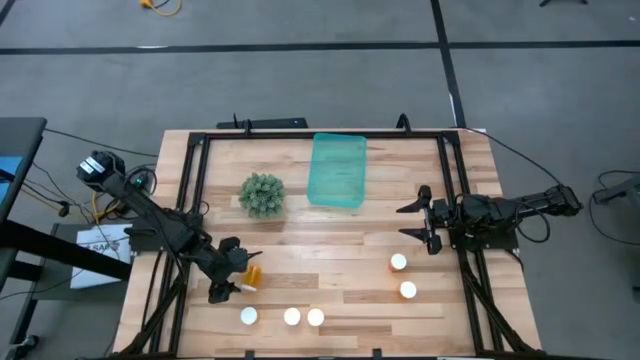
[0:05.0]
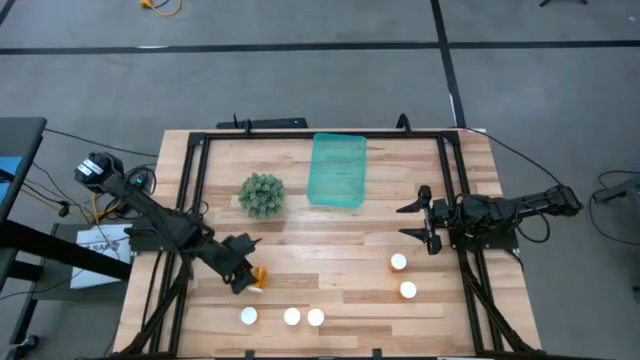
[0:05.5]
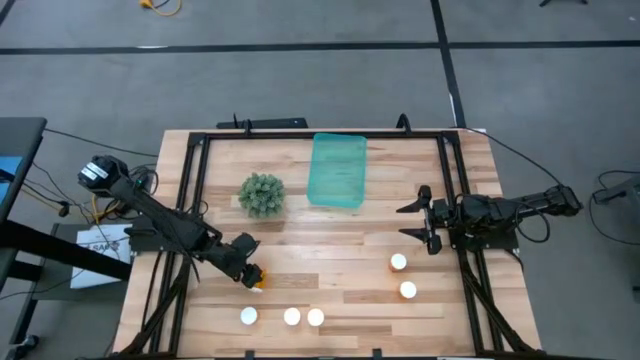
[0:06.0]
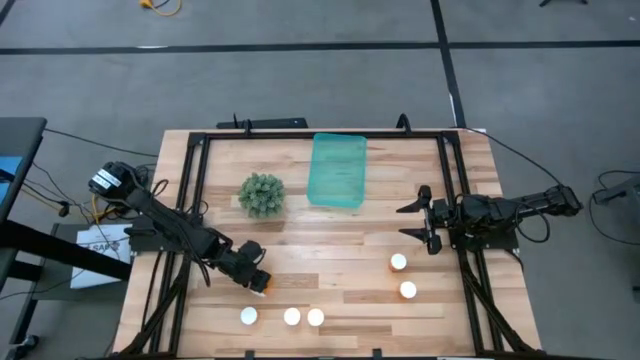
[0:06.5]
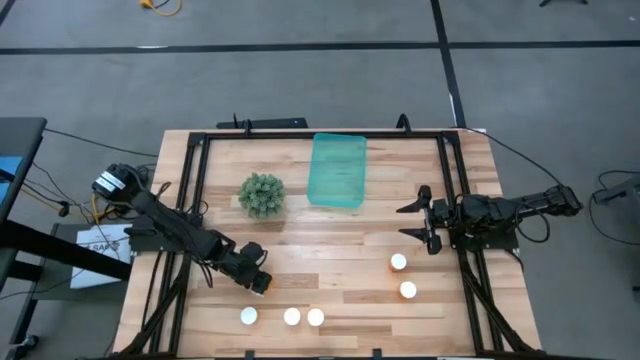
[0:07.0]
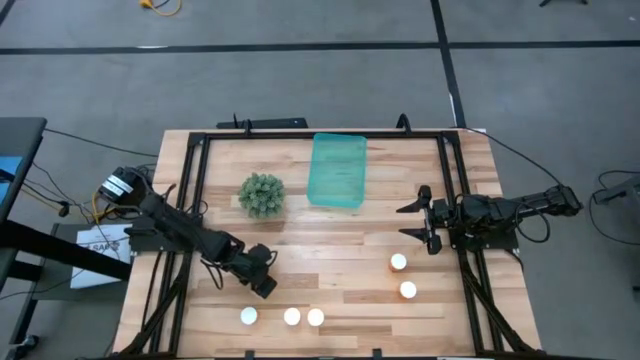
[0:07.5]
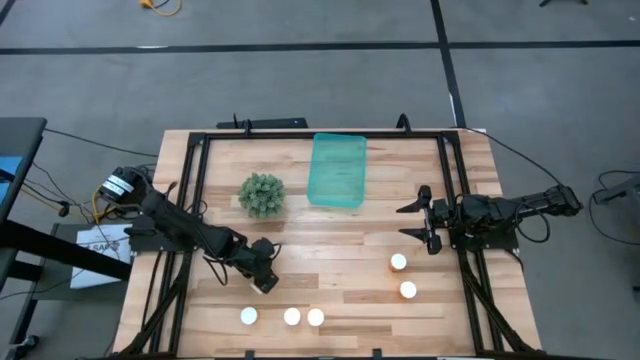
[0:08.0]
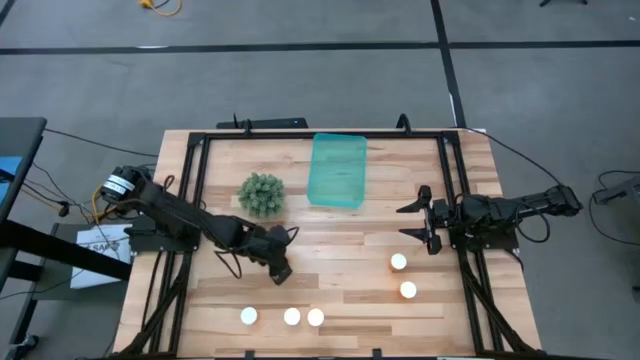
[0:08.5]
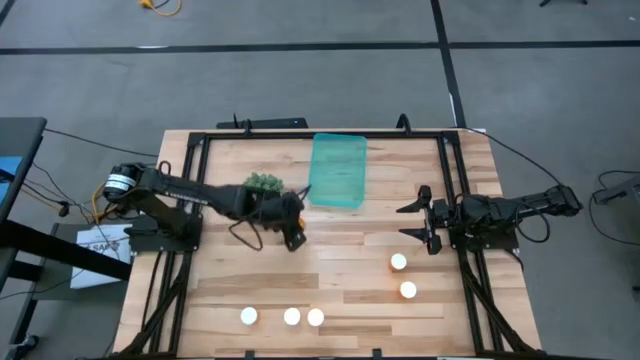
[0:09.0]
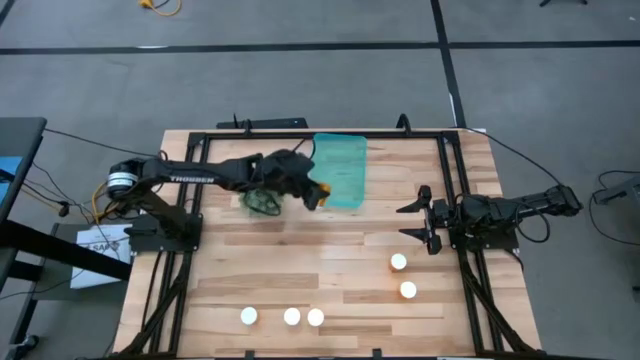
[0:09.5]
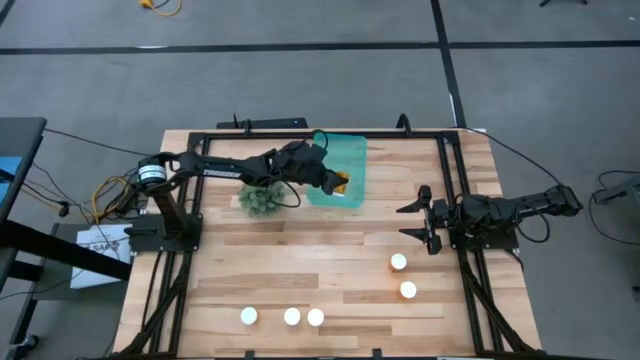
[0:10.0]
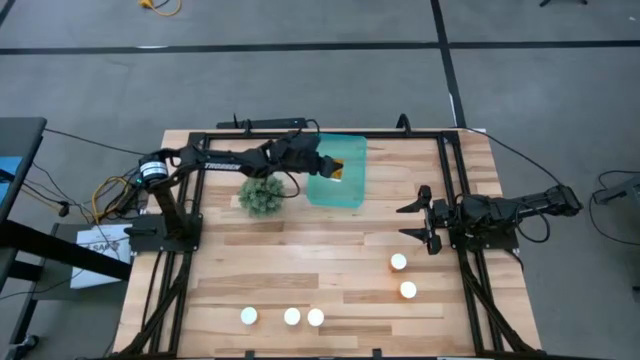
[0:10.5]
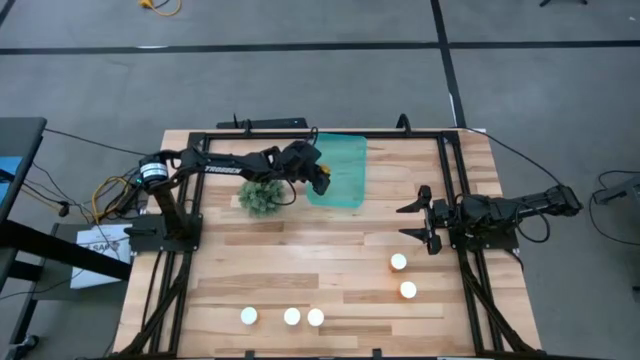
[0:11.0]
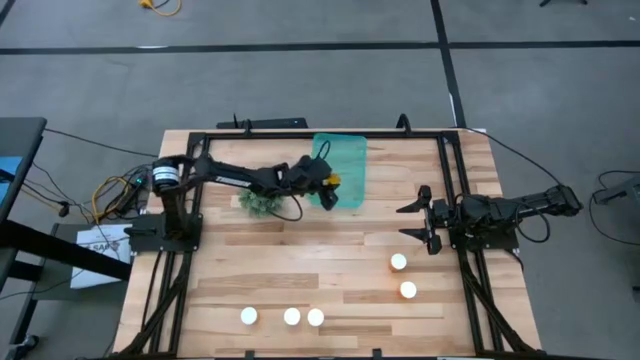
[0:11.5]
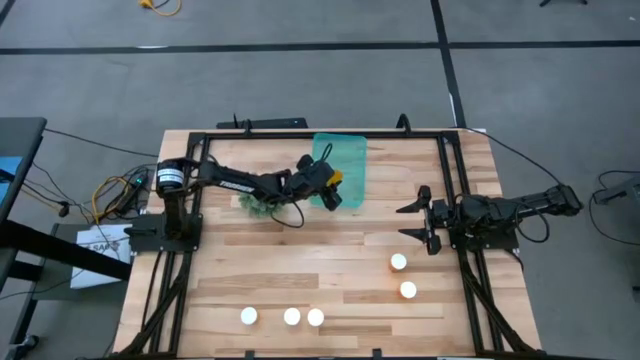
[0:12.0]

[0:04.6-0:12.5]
Task: Pick and place pill bottles into a basket
Put the orange pill bottle into the green bin

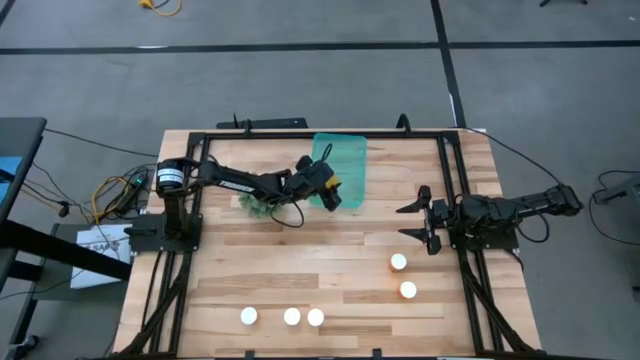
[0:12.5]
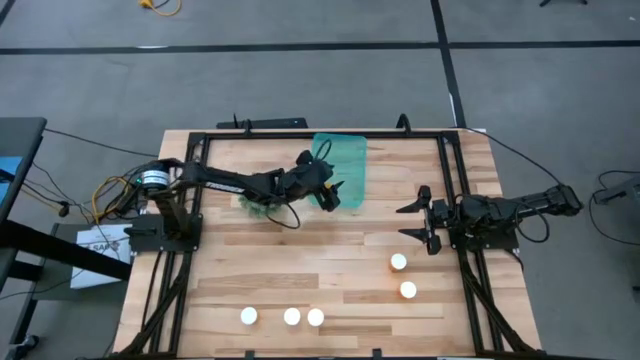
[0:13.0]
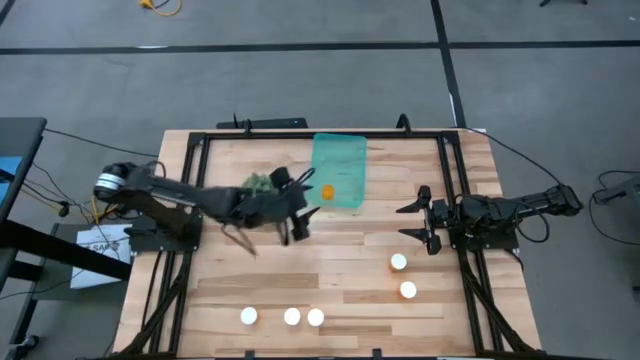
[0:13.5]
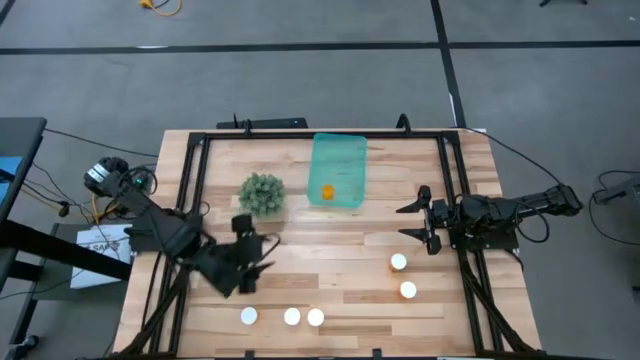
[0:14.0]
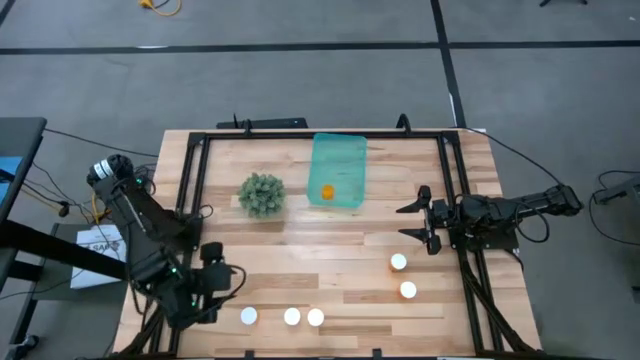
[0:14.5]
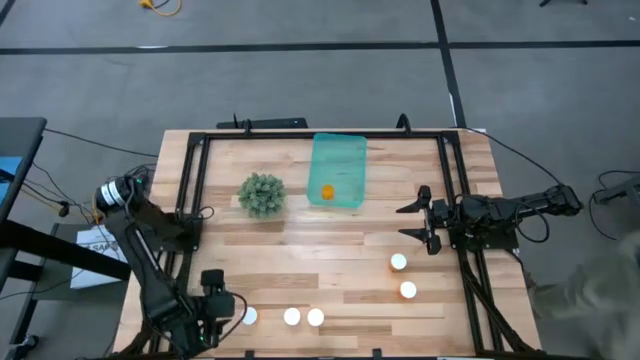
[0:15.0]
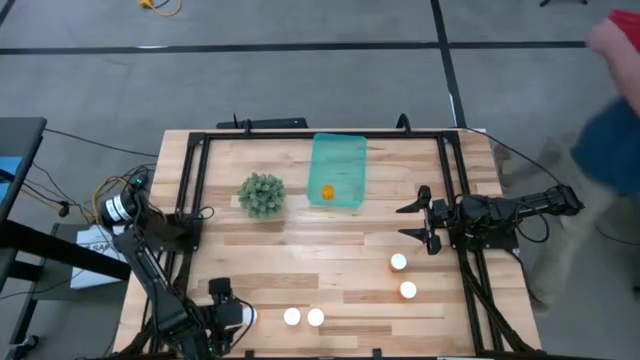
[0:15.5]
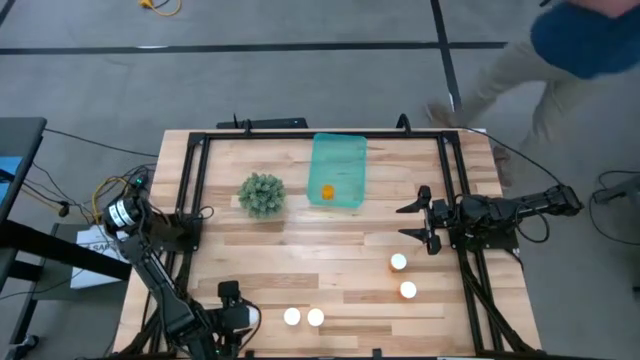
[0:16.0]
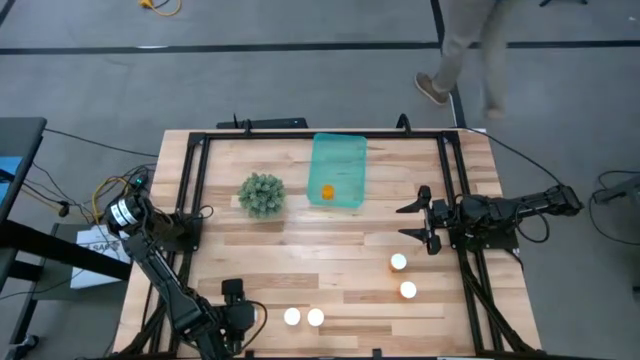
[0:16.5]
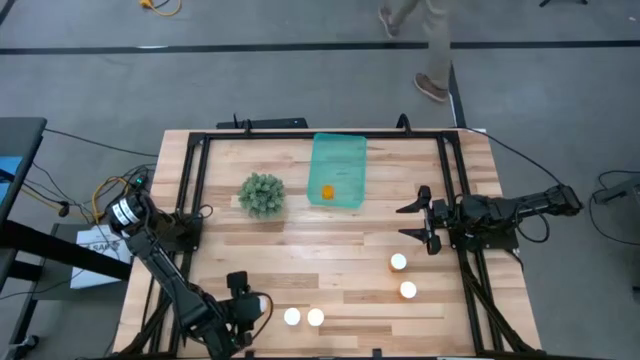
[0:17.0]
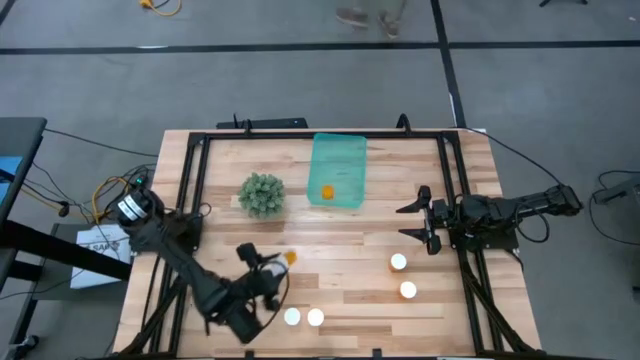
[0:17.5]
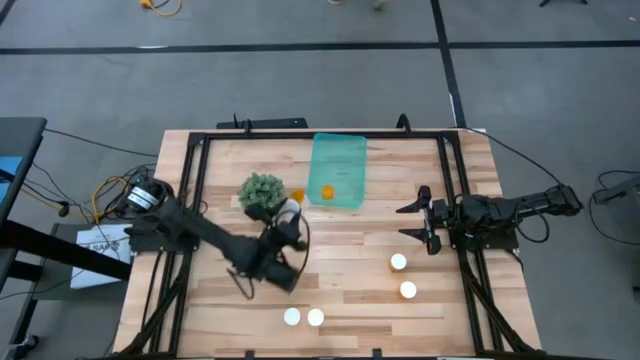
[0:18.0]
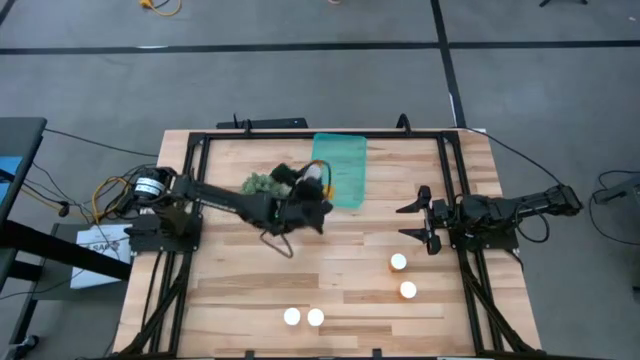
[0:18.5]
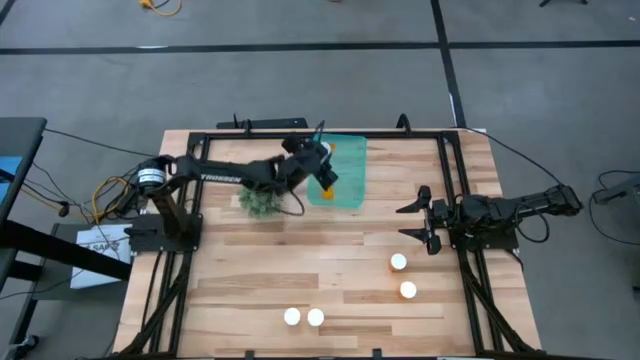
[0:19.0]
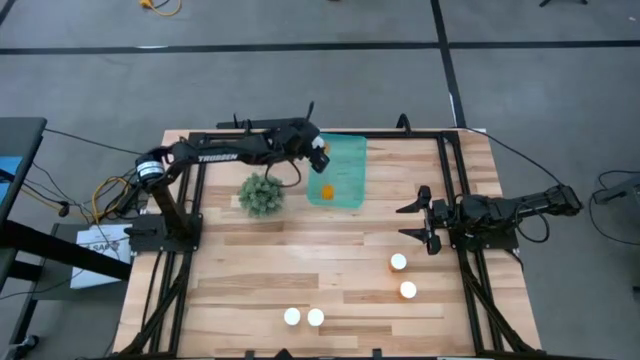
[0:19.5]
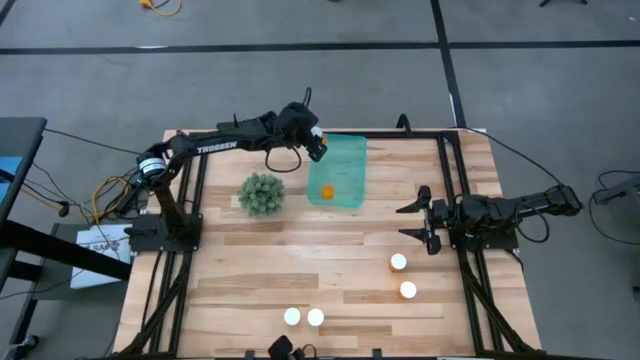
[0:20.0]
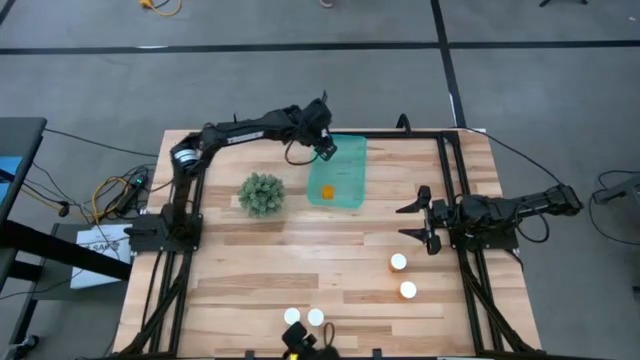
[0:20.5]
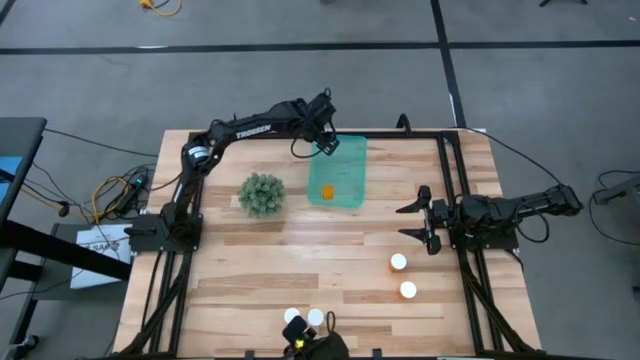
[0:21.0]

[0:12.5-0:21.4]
Put the orange pill bottle into the green bin

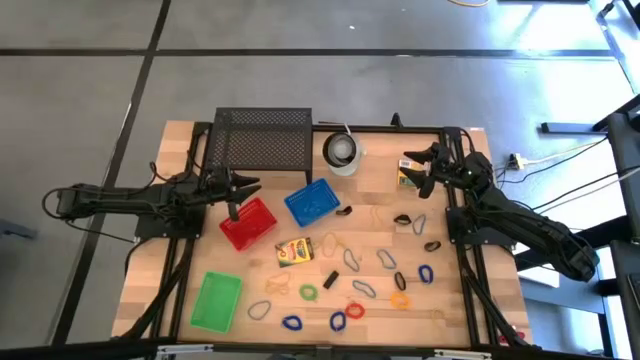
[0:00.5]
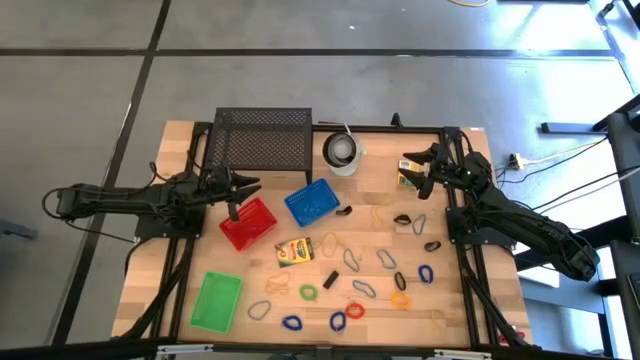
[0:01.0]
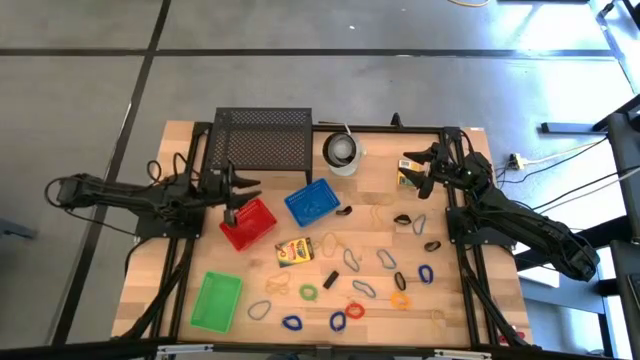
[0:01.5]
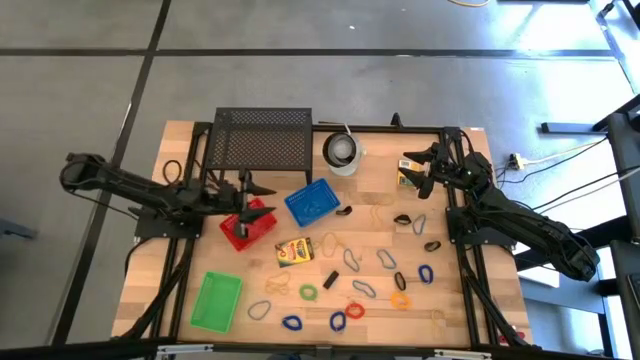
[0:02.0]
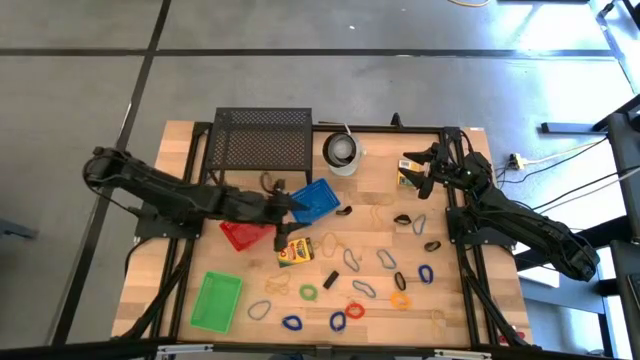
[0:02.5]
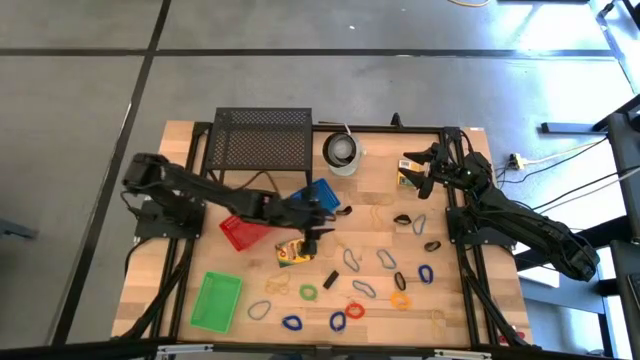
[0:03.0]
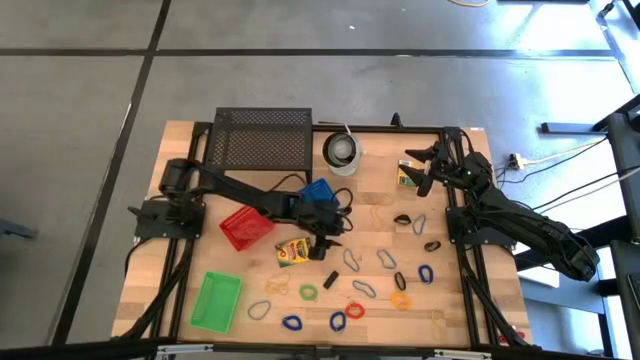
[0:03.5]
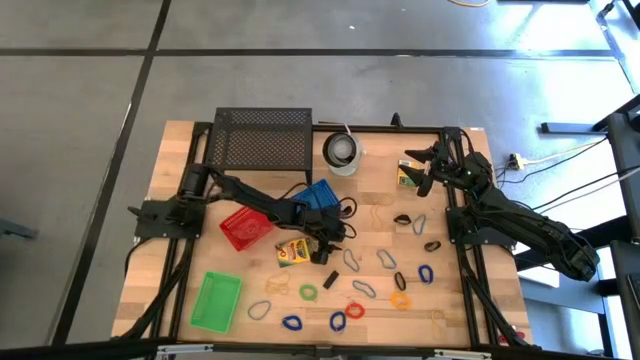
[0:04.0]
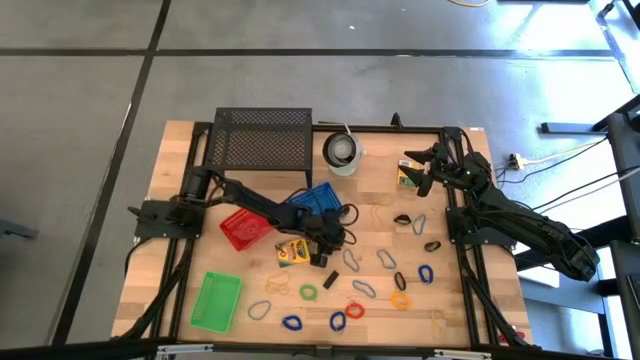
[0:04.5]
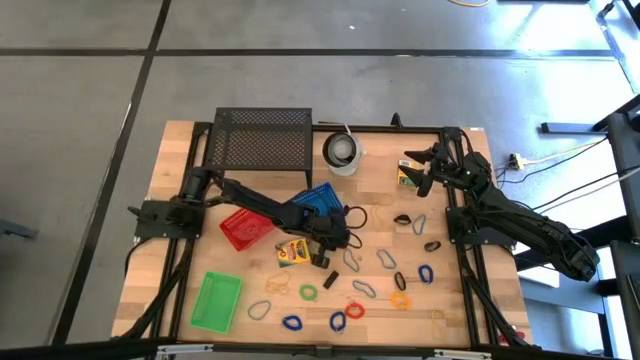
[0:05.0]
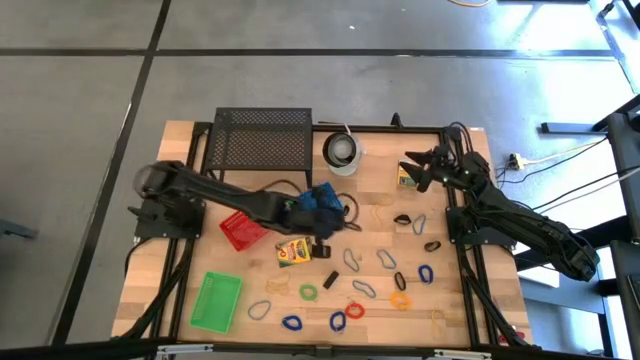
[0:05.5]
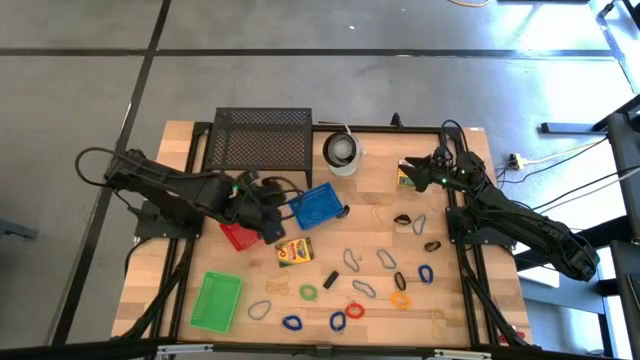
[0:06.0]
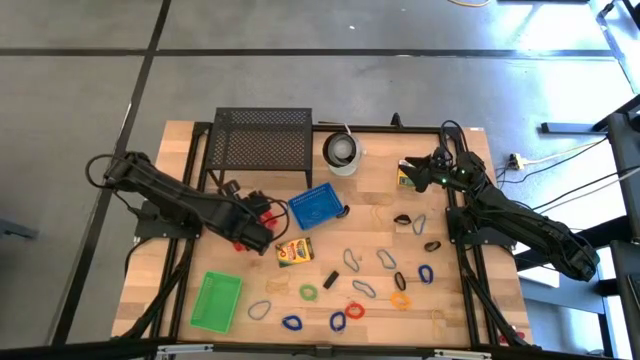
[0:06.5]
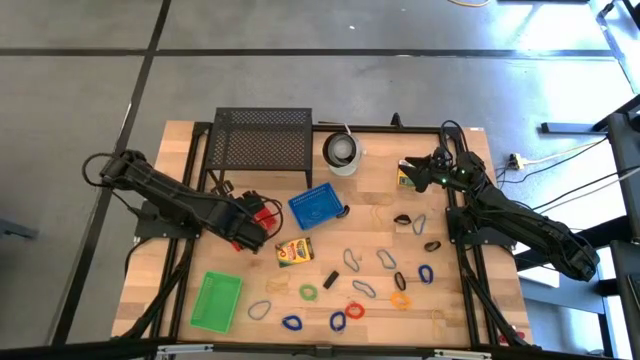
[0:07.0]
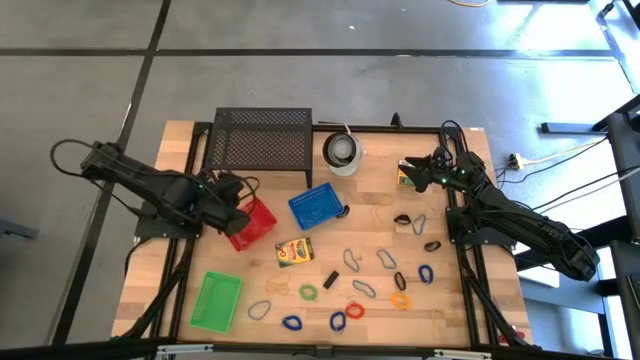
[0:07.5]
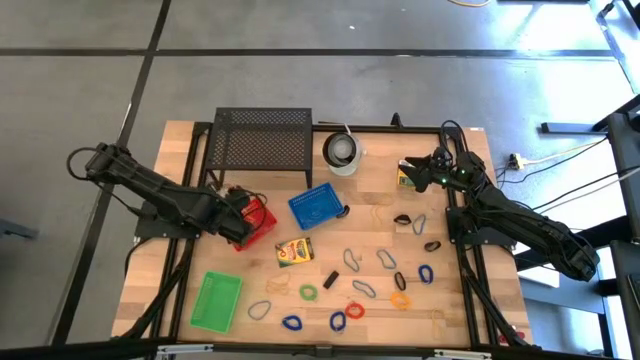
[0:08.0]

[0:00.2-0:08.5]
Task: Pick & Place Office Desk Supplies
Put the yellow rubber band into the red bin
